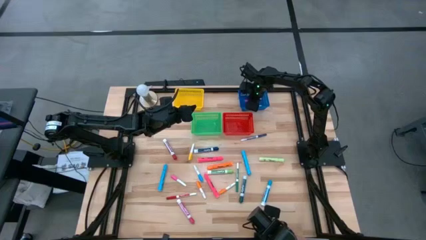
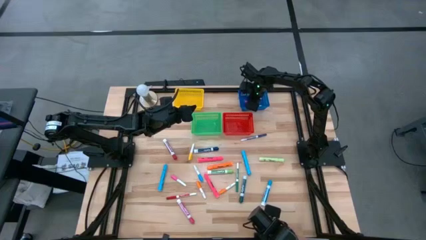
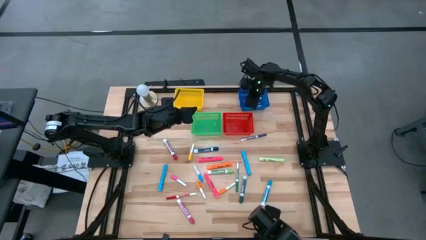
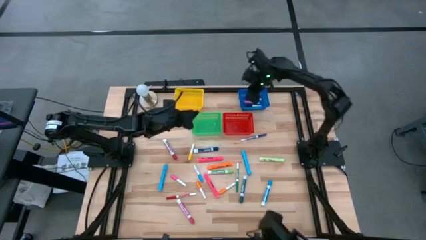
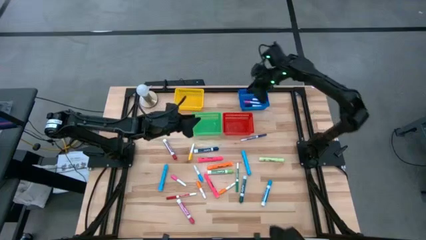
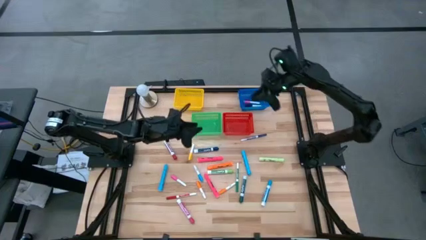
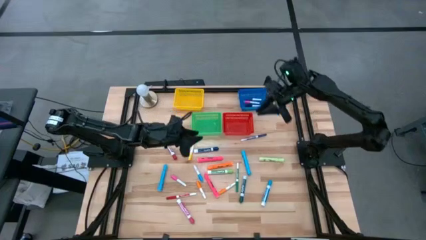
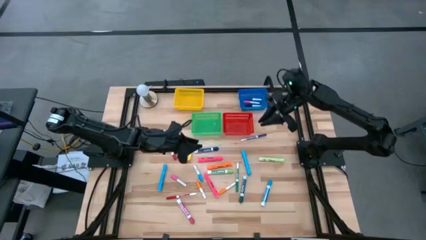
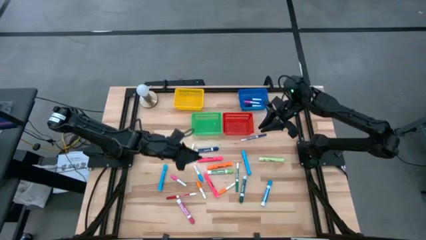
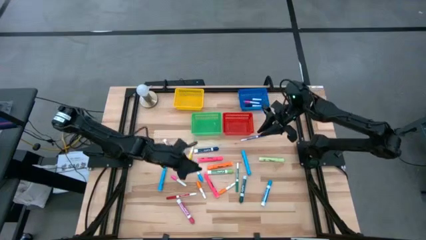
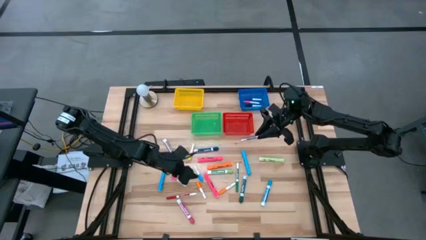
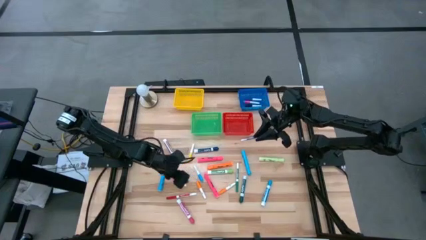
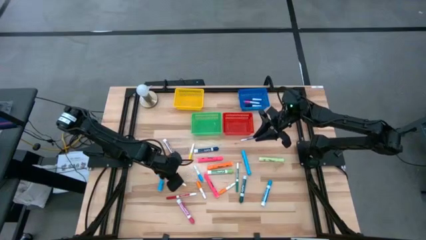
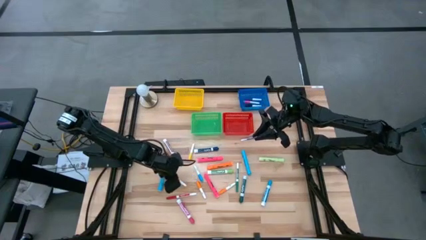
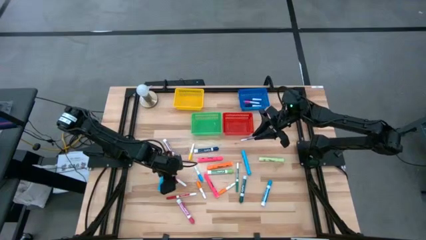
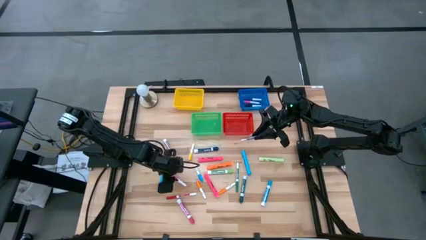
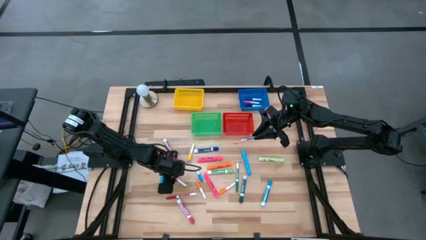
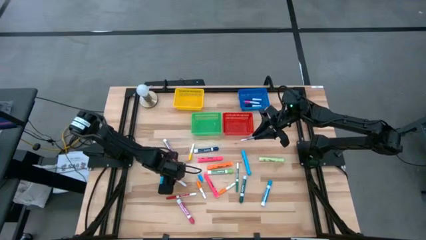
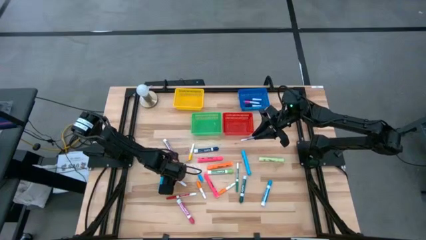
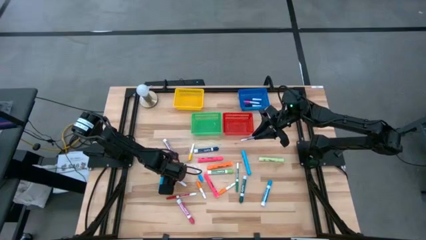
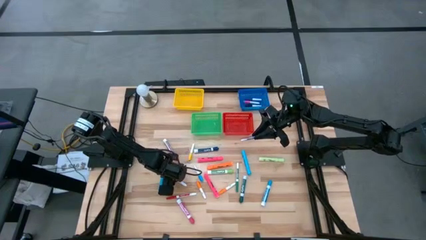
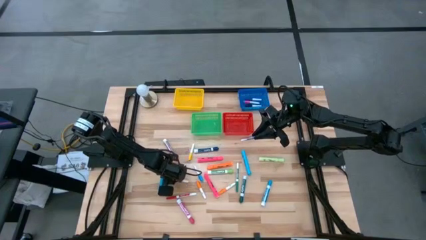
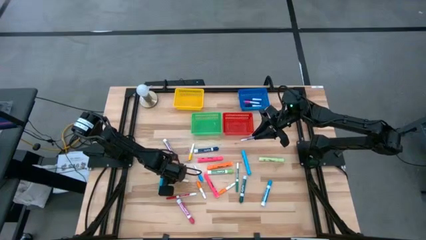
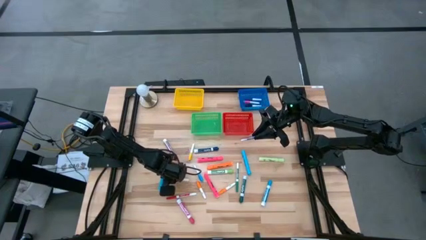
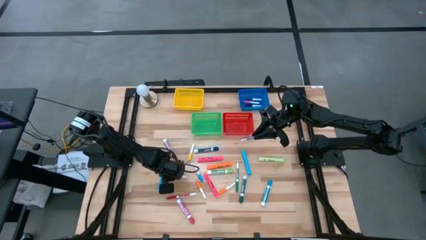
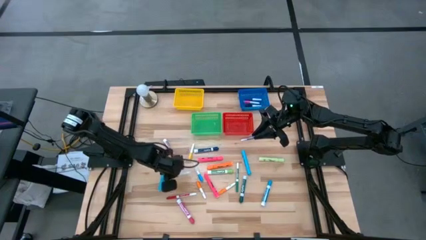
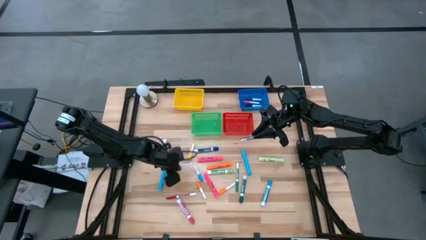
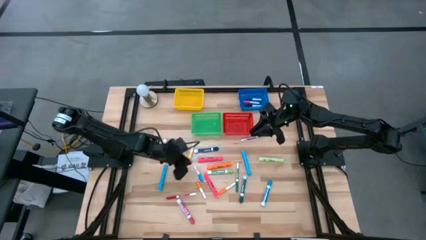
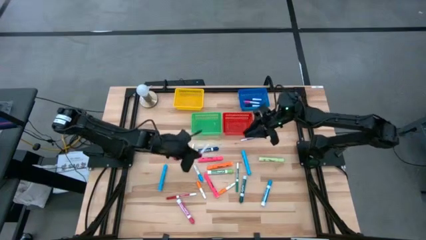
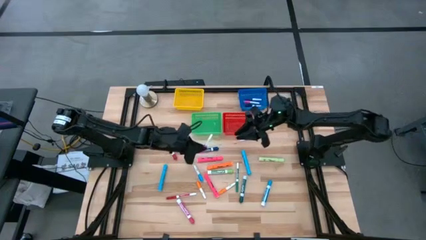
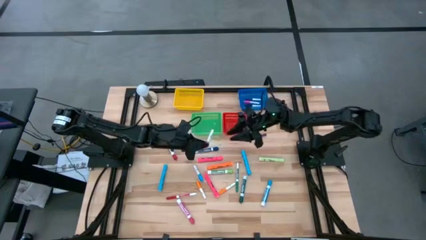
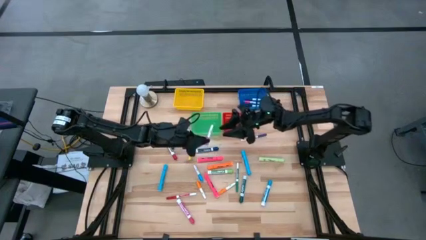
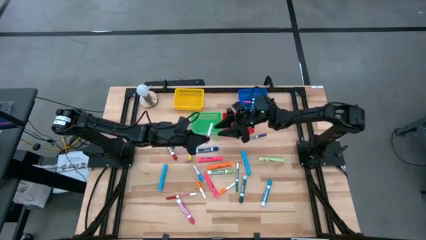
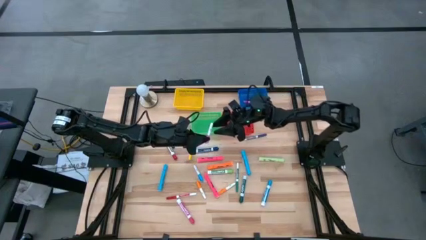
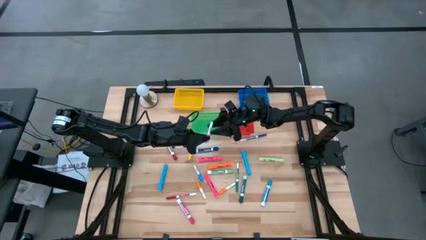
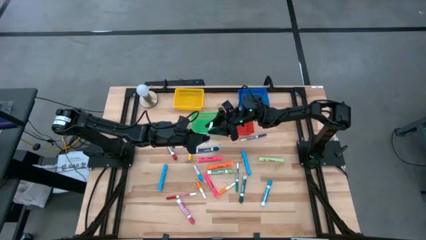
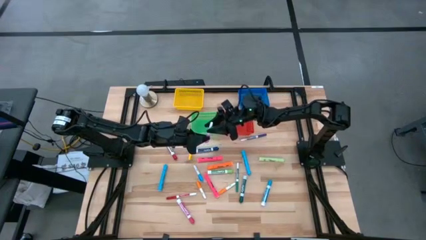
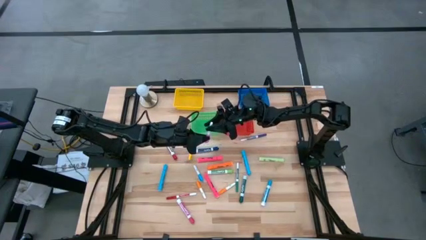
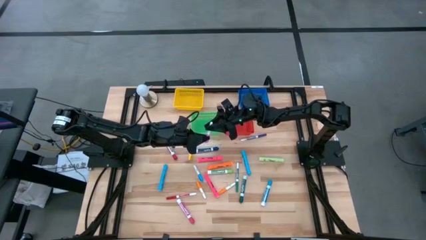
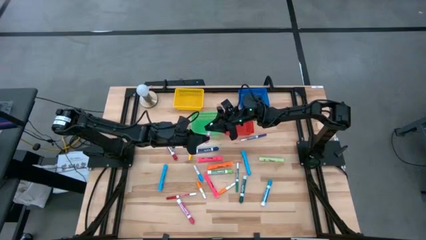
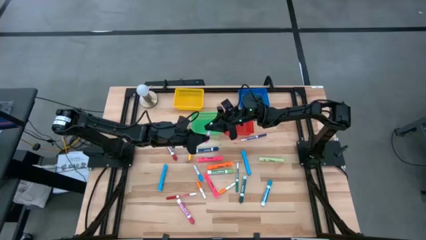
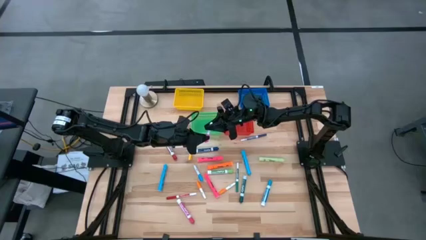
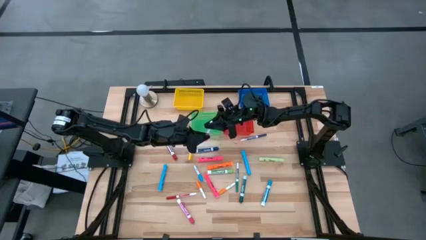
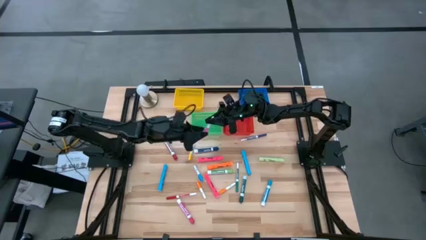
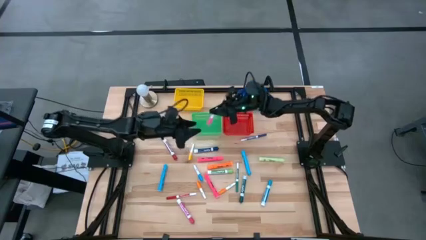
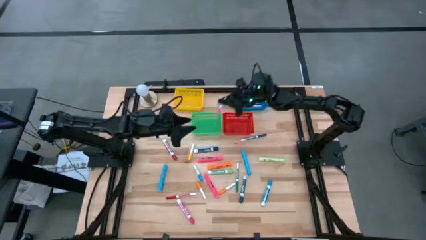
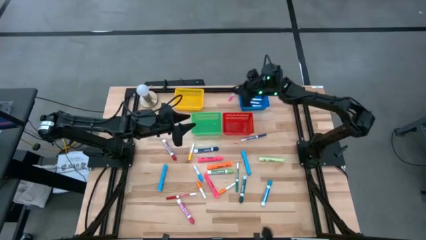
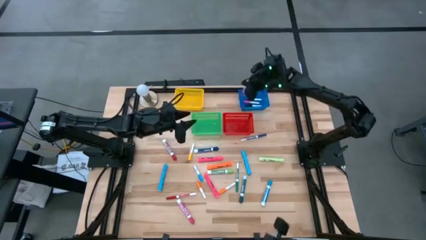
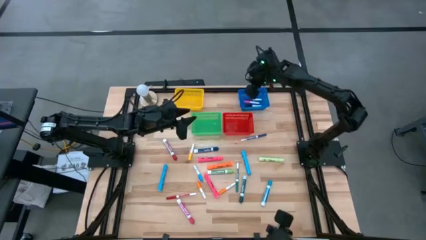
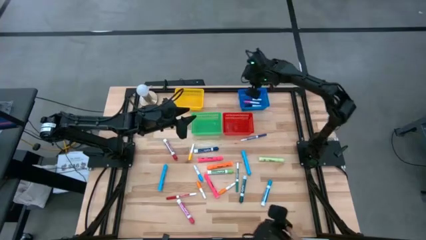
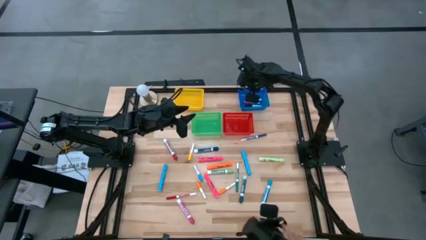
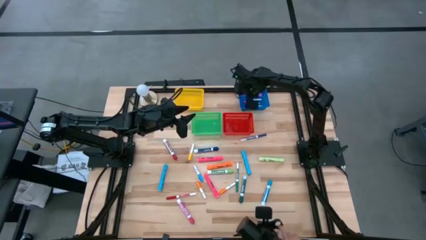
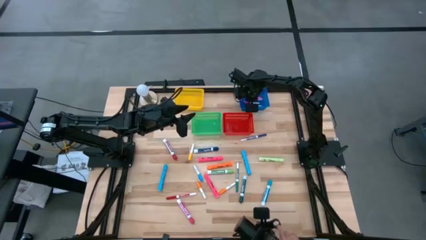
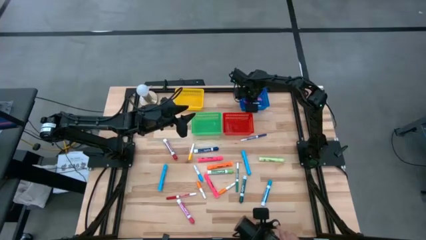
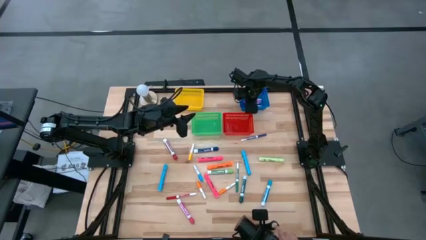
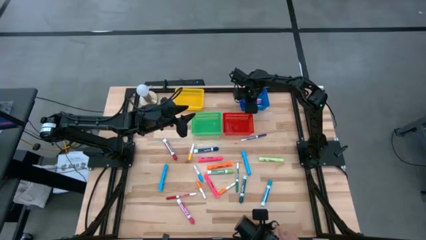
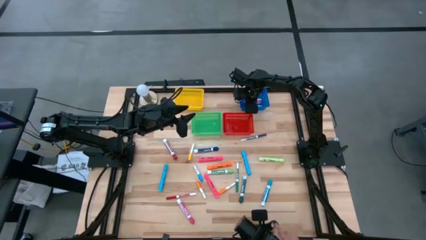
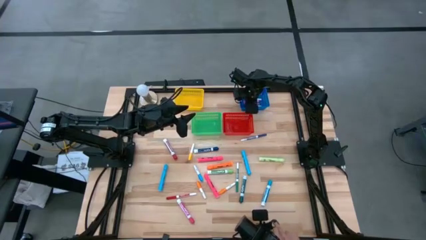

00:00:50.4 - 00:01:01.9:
Task: Pick & Place Markers
Put the pink highlighter into the blue bin

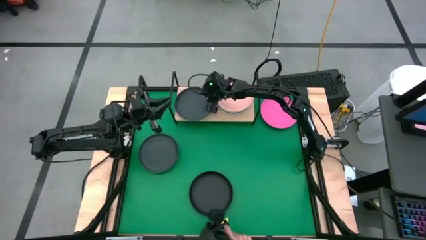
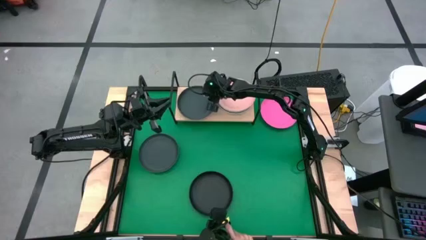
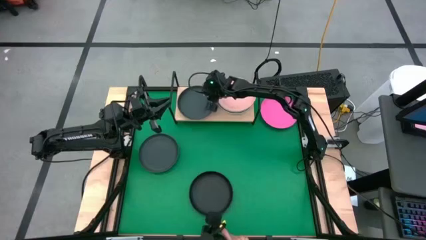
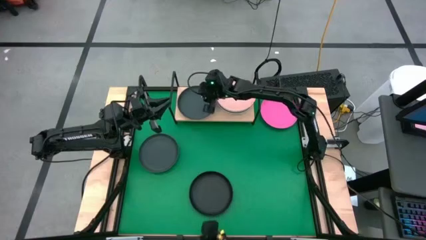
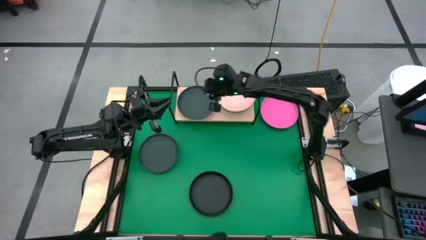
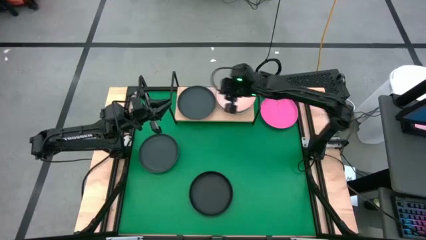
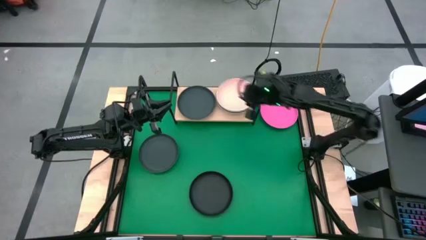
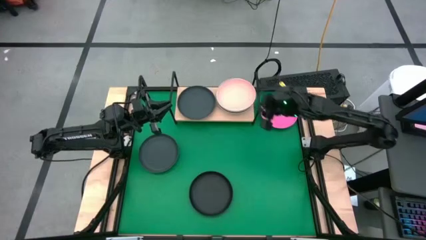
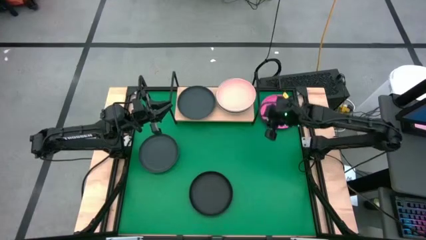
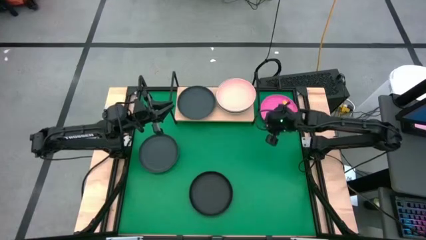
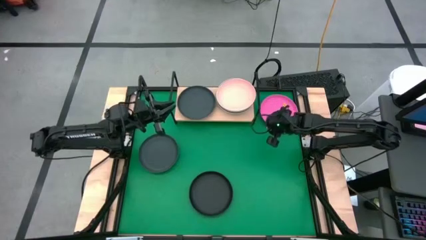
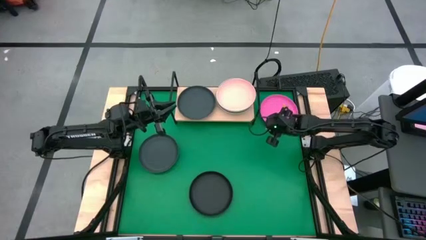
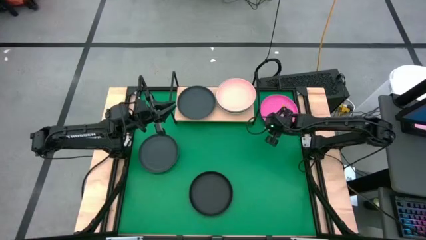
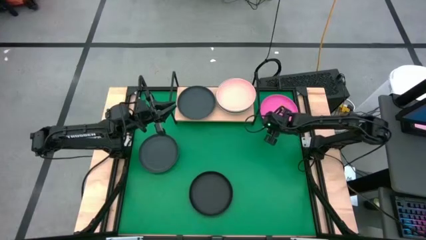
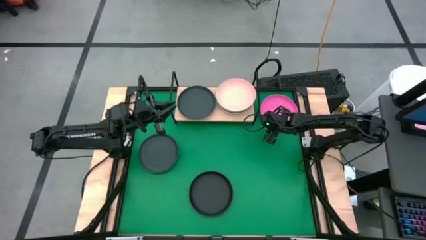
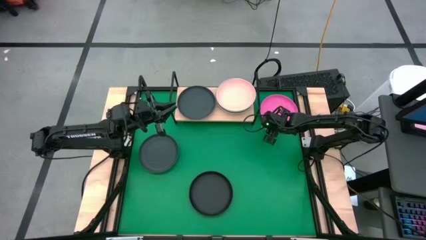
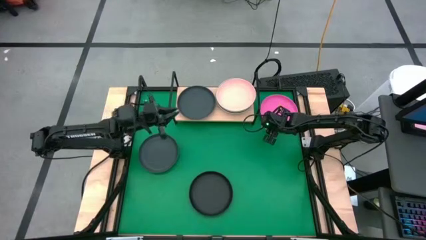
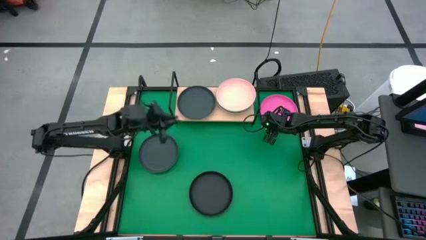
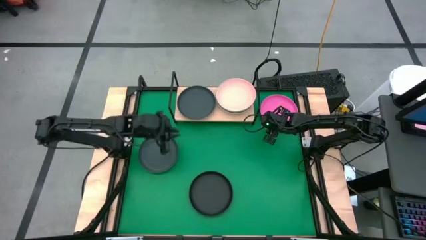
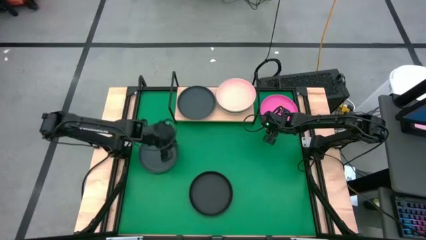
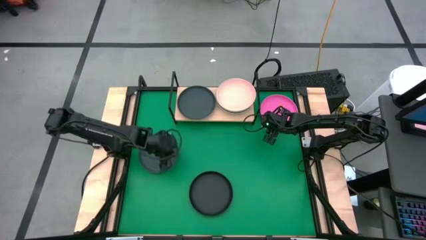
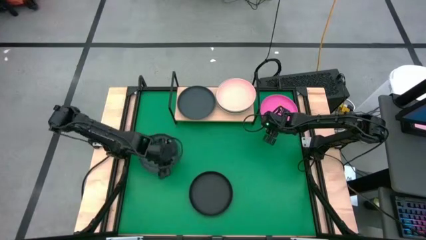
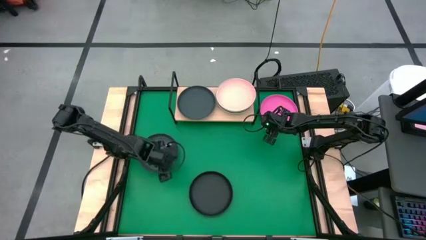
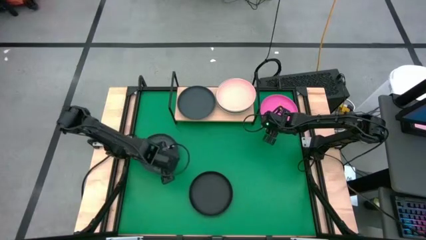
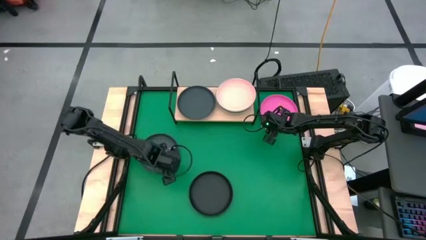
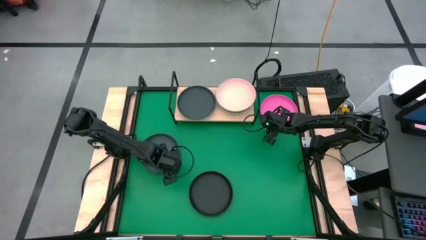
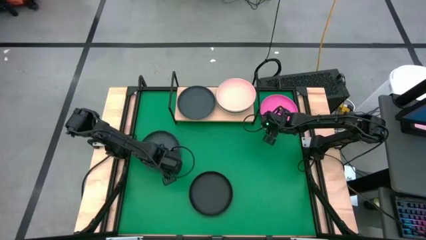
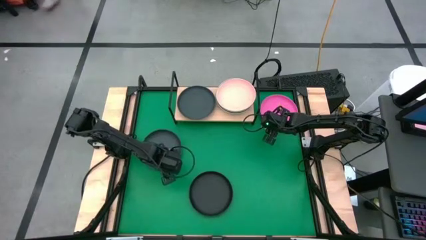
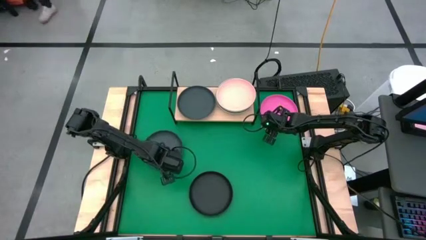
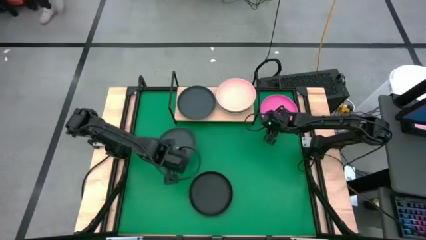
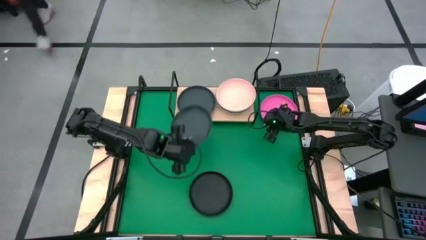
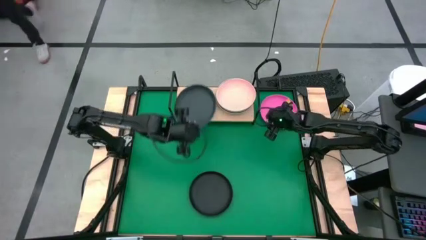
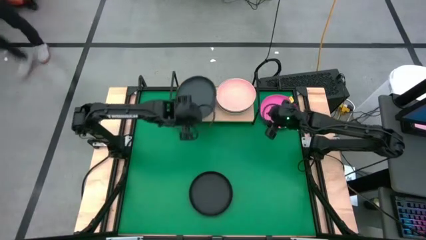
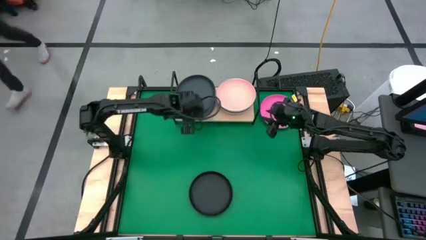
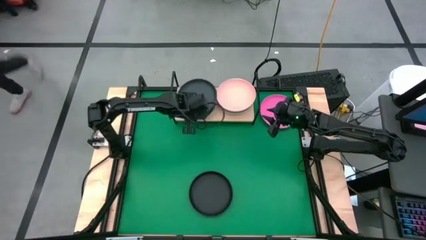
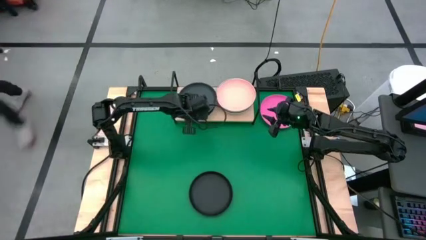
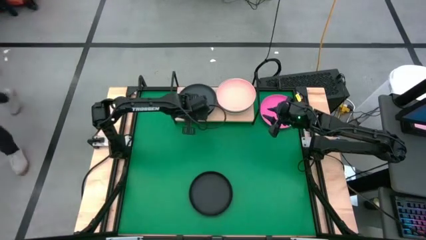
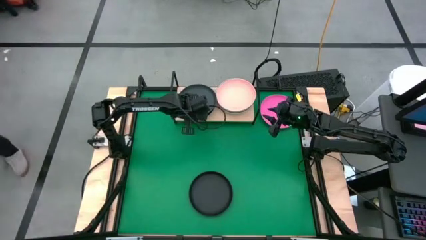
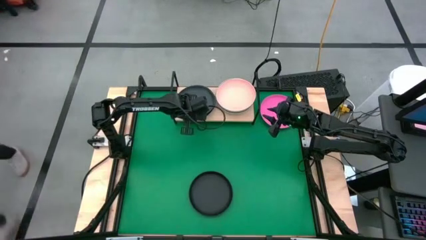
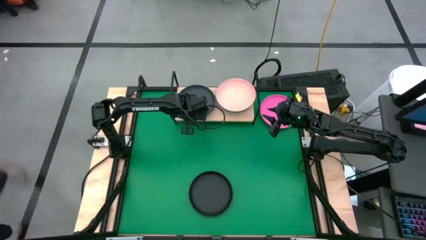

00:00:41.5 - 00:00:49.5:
Task: Place and stack plates onto a shelf
Stack the top black plate on top of the black plate
